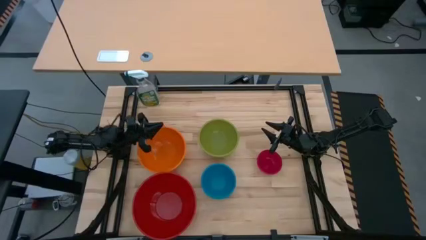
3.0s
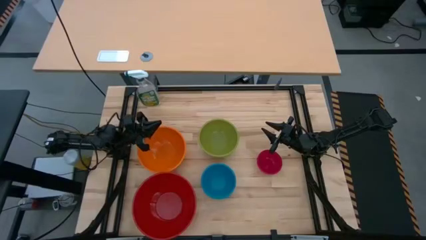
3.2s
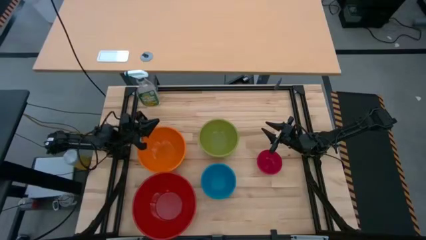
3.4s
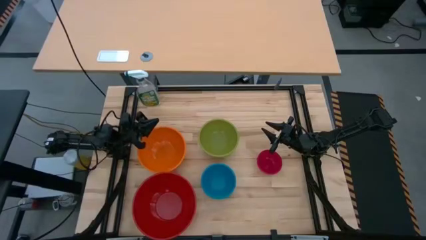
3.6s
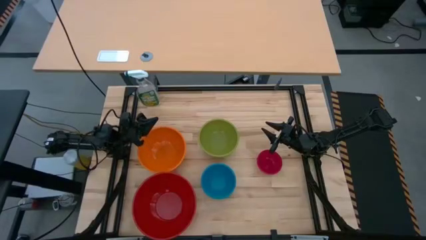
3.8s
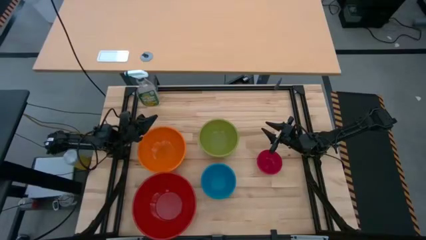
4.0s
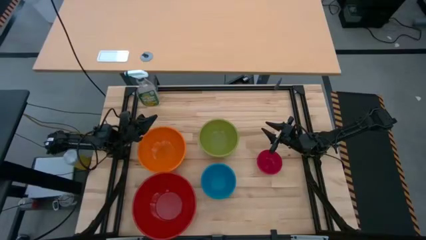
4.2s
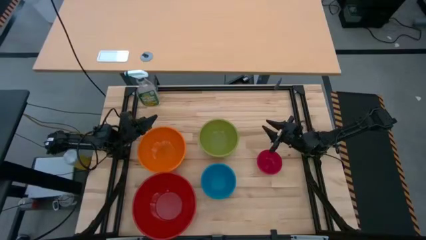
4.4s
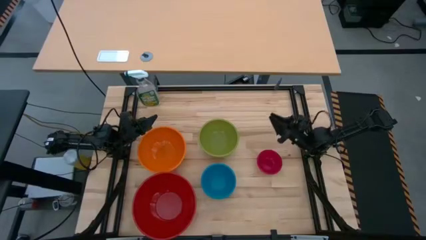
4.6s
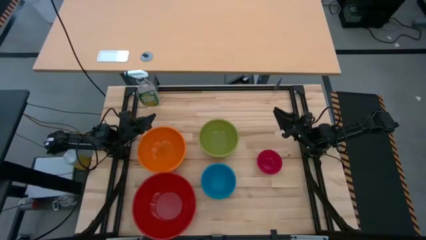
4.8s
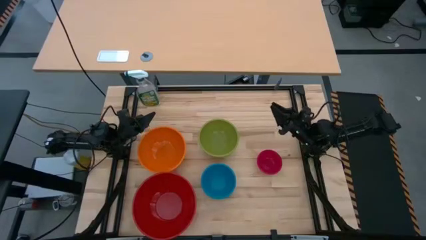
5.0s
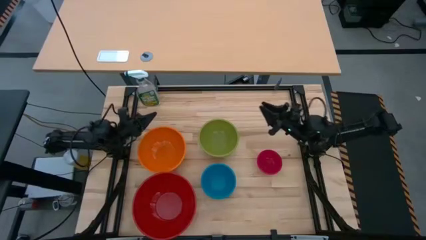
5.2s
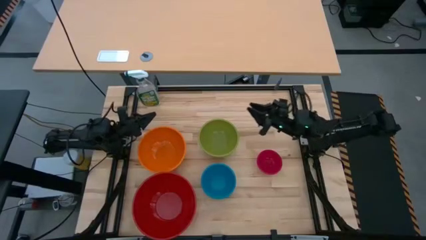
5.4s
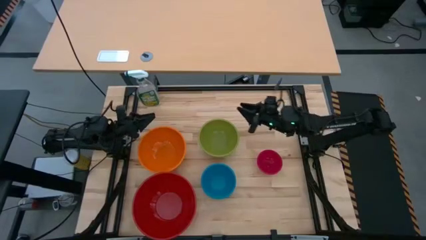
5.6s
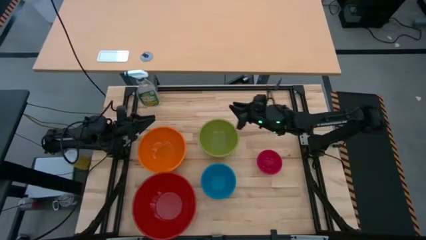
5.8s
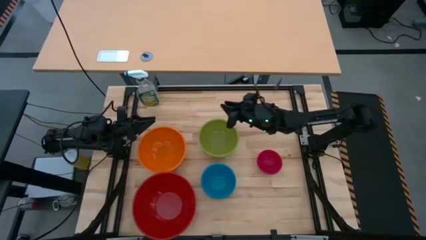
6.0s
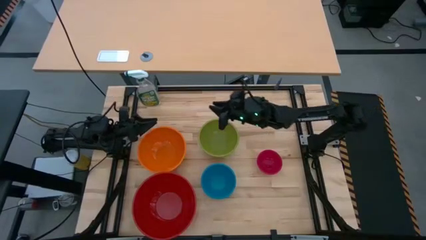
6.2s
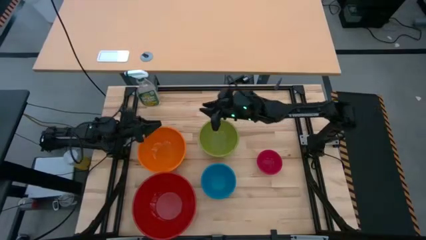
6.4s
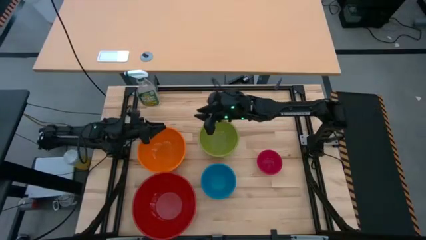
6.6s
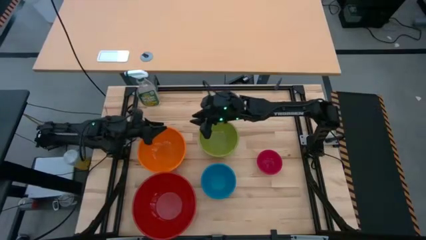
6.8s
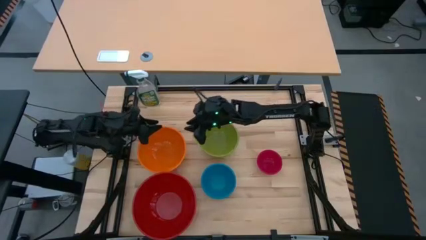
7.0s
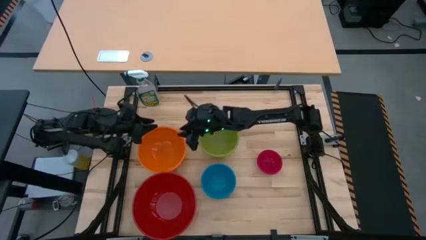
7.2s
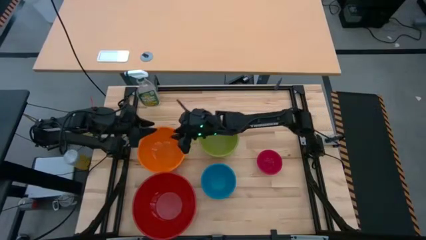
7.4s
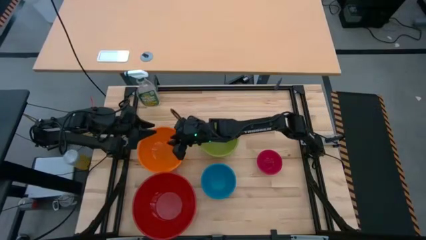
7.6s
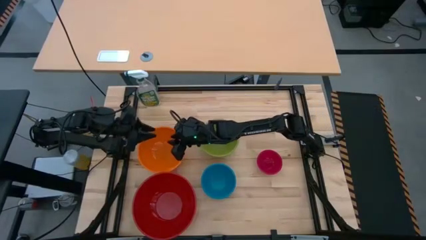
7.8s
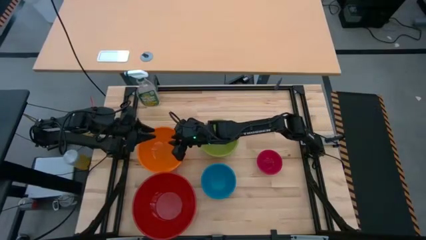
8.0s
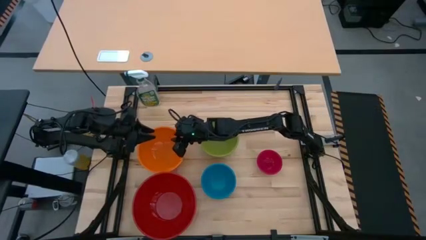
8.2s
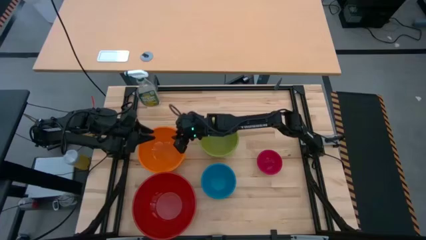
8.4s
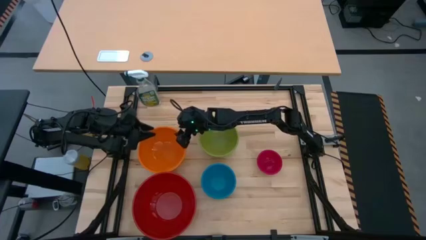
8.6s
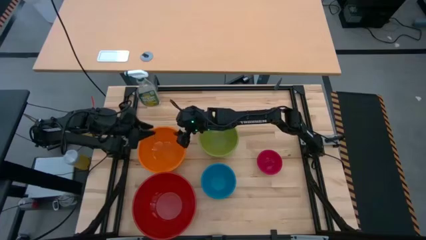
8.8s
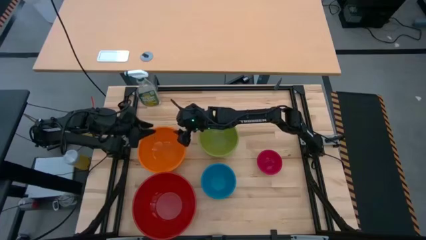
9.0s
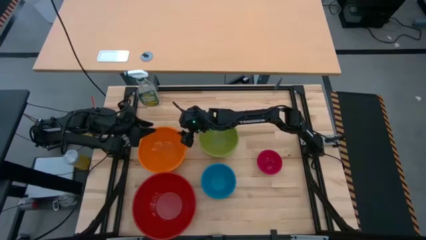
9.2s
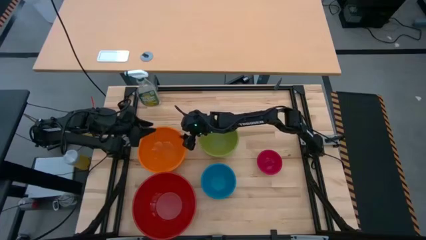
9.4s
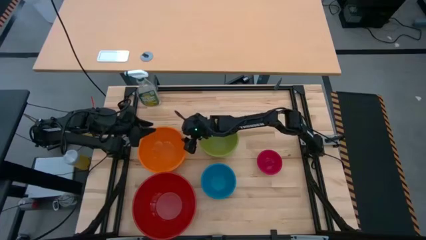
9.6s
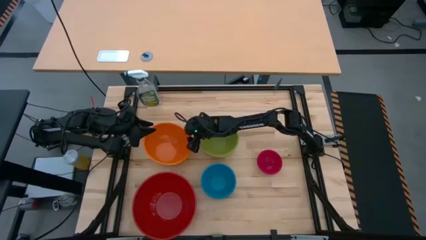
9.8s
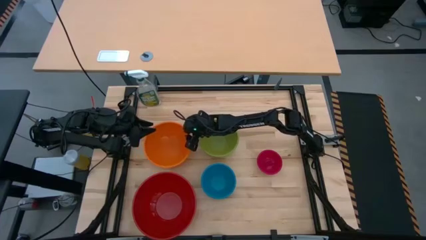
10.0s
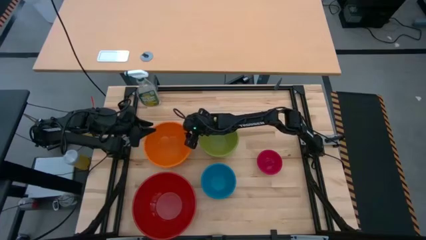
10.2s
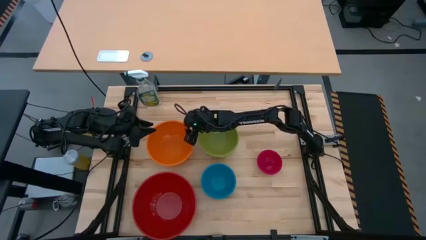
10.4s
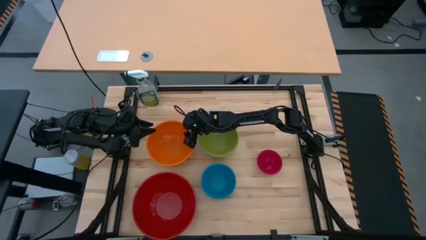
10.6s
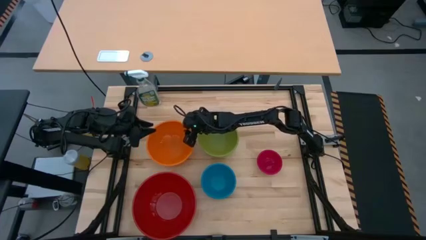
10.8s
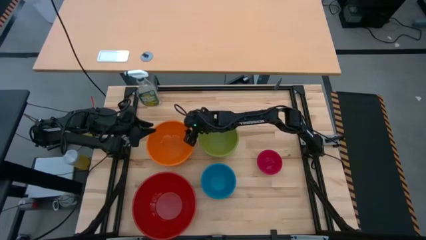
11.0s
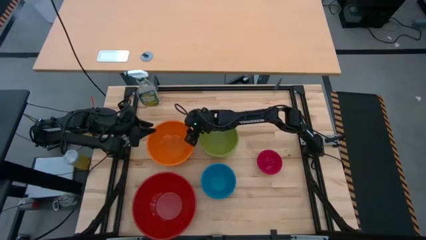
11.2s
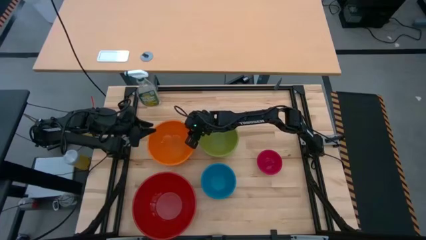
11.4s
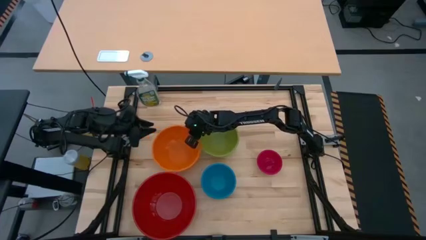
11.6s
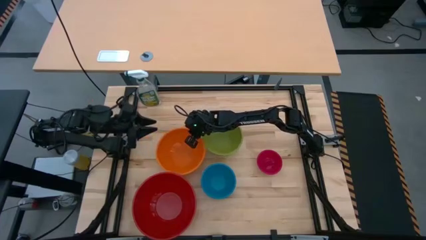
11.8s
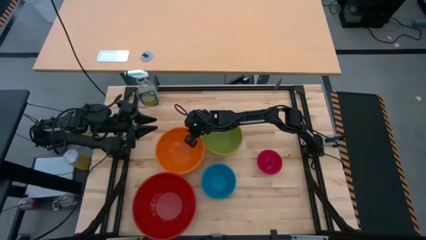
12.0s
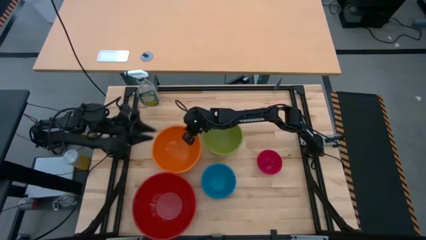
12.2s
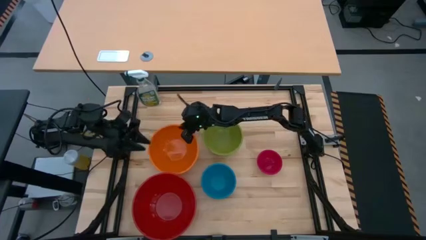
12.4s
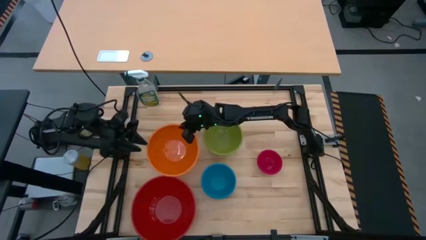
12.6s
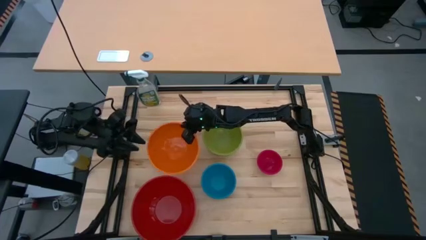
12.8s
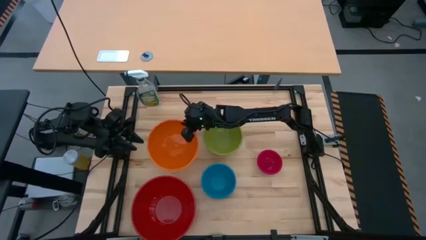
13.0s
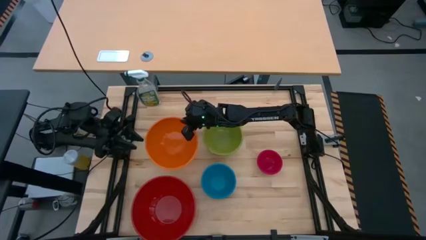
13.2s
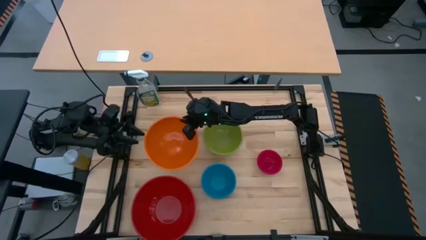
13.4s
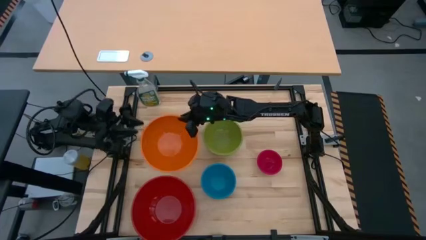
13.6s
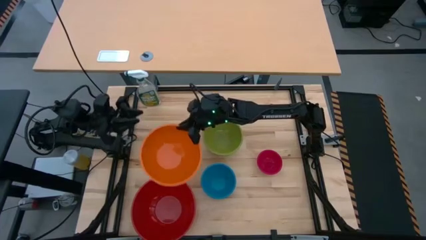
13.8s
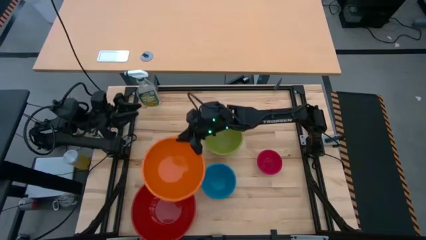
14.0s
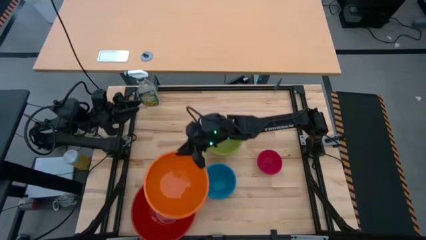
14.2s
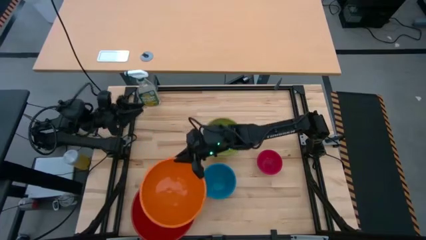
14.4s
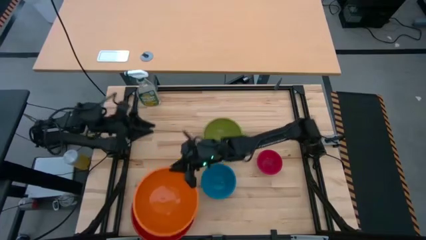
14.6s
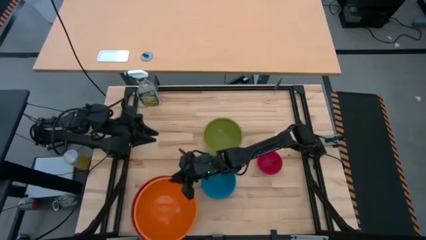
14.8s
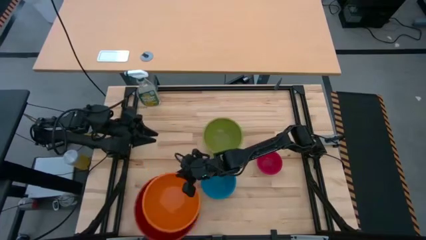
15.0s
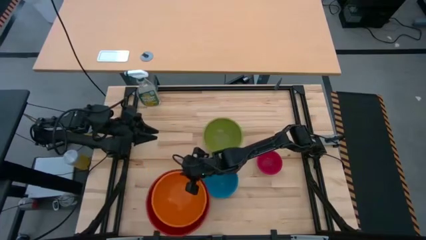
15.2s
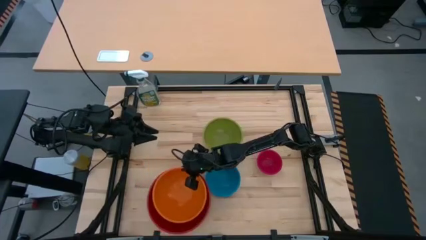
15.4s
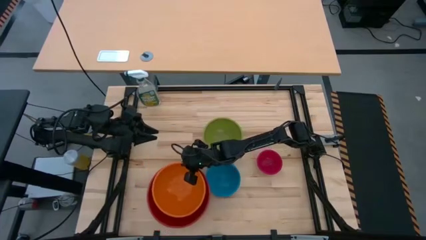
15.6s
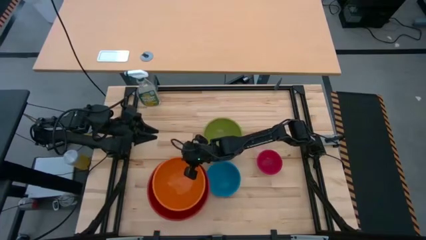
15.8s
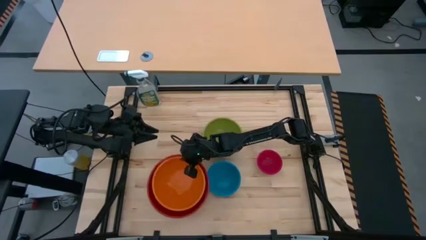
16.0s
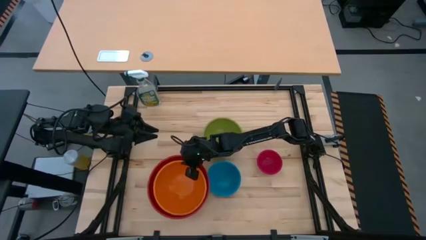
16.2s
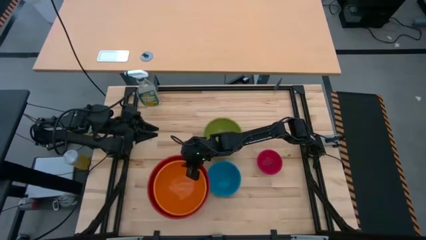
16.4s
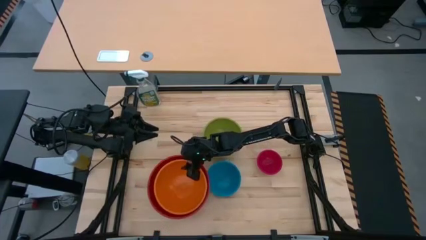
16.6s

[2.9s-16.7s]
Stack the orange bowl on top of the red bowl
